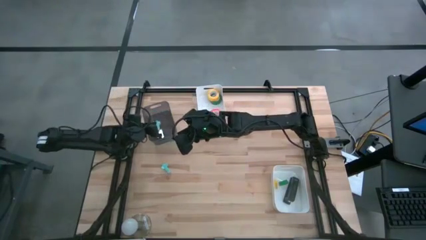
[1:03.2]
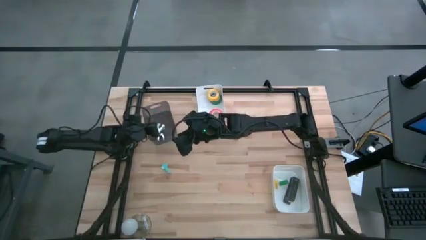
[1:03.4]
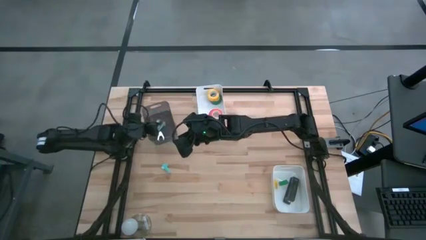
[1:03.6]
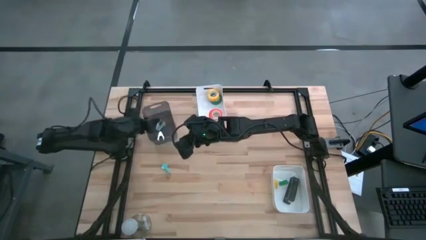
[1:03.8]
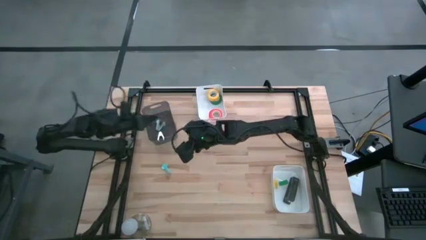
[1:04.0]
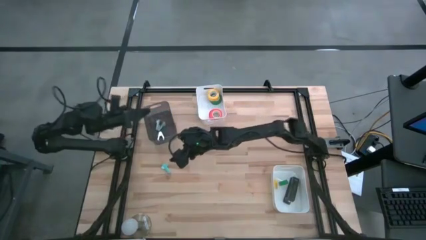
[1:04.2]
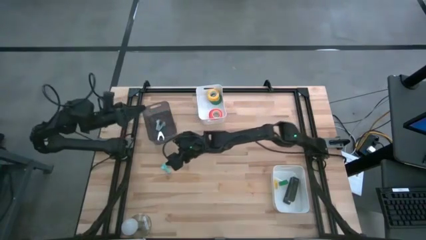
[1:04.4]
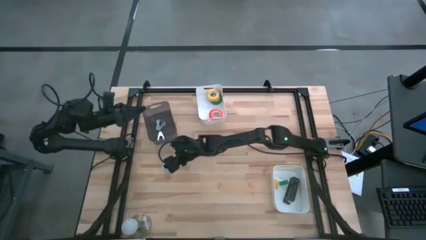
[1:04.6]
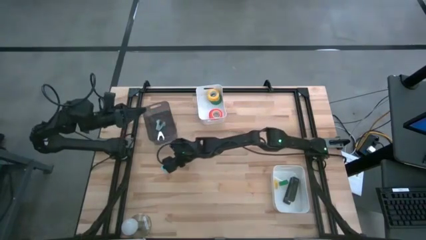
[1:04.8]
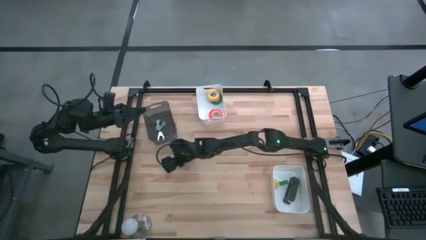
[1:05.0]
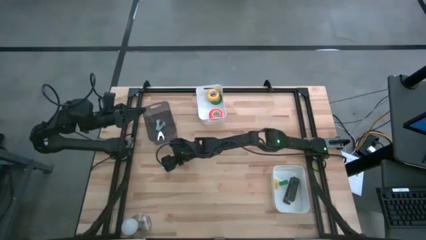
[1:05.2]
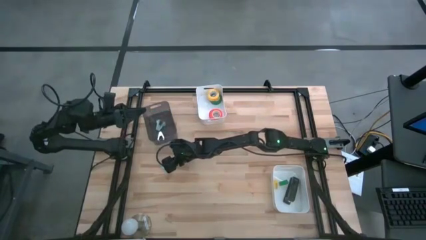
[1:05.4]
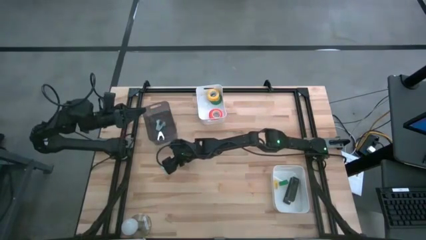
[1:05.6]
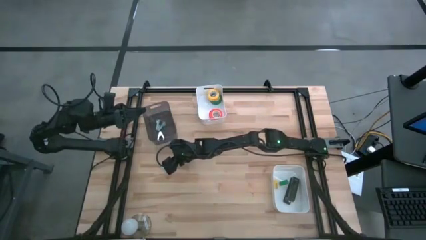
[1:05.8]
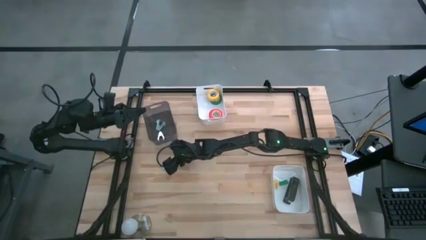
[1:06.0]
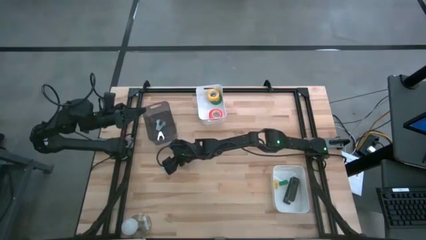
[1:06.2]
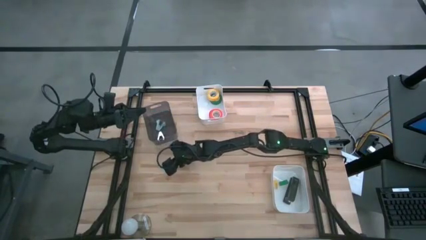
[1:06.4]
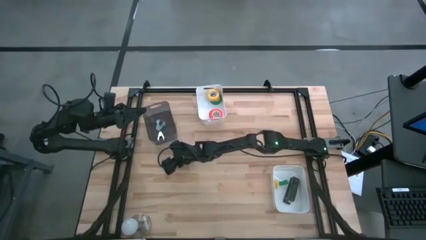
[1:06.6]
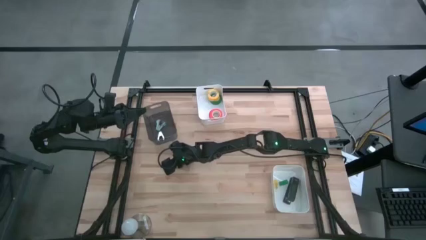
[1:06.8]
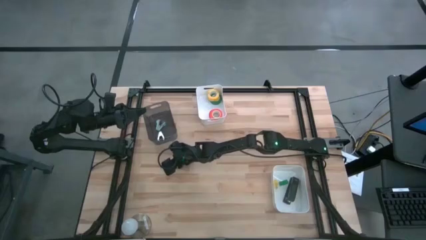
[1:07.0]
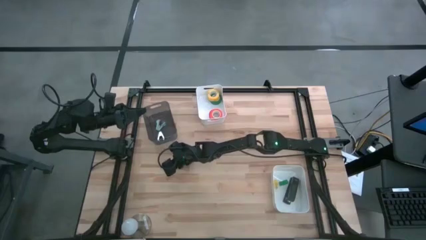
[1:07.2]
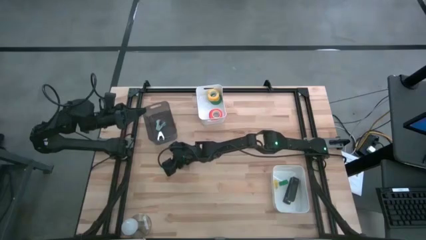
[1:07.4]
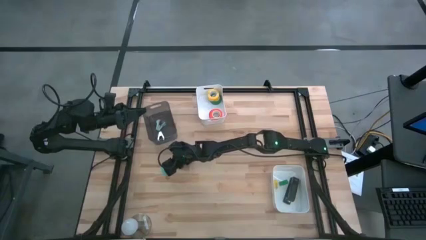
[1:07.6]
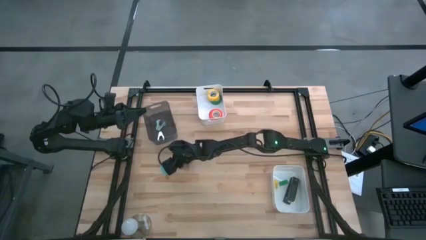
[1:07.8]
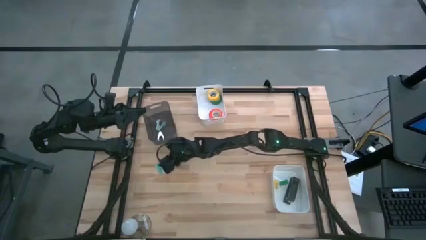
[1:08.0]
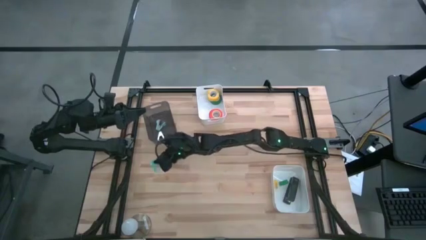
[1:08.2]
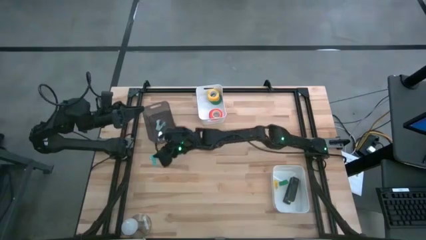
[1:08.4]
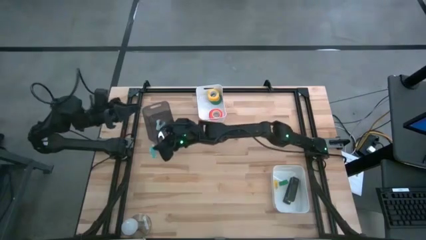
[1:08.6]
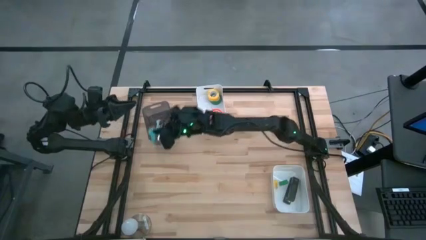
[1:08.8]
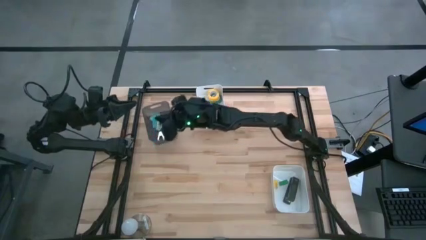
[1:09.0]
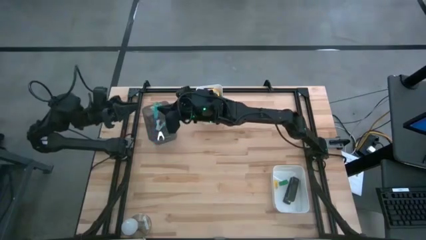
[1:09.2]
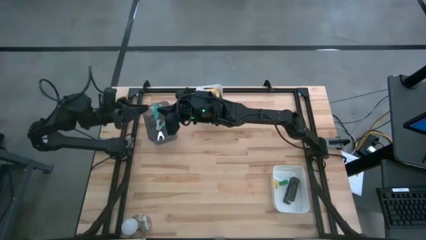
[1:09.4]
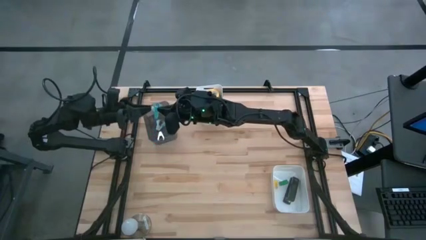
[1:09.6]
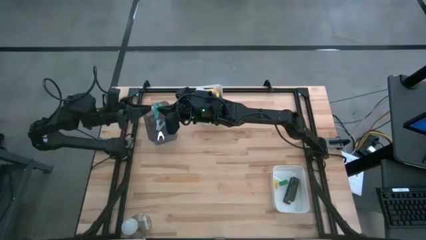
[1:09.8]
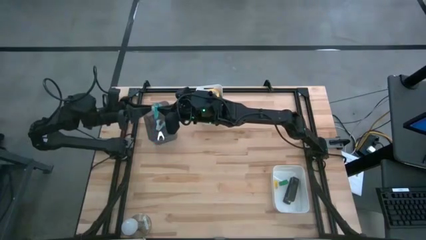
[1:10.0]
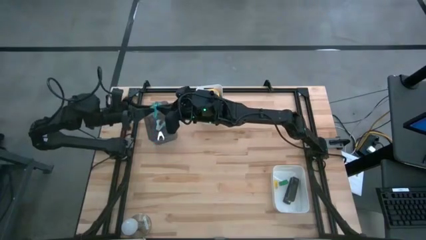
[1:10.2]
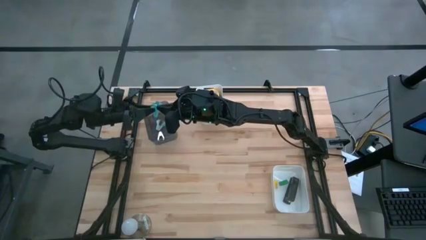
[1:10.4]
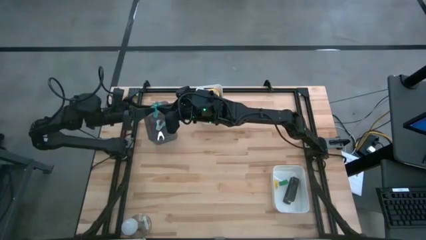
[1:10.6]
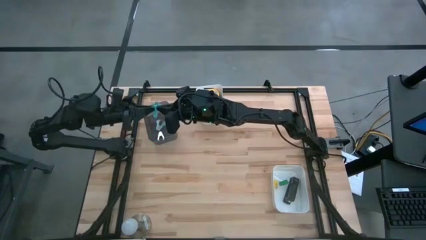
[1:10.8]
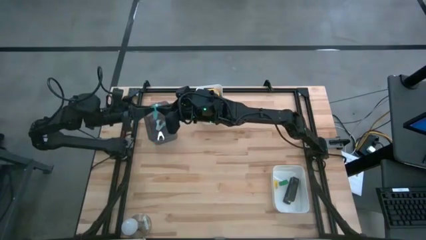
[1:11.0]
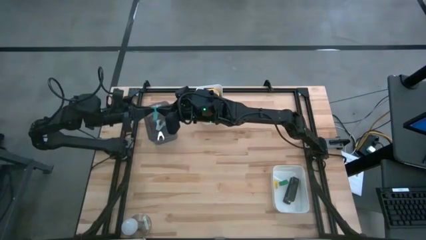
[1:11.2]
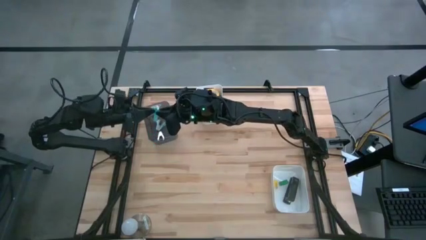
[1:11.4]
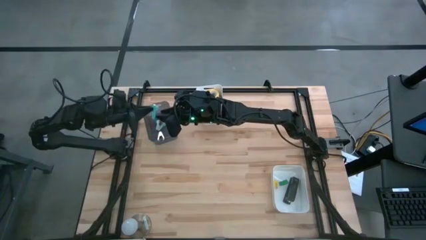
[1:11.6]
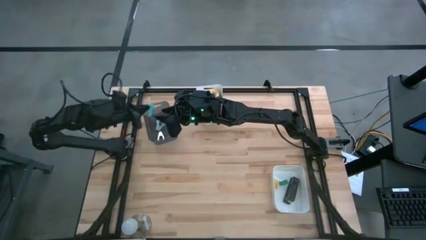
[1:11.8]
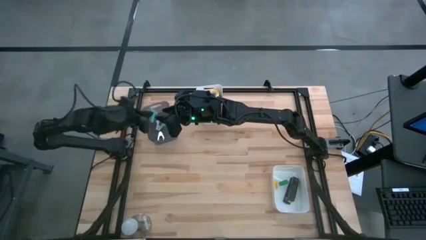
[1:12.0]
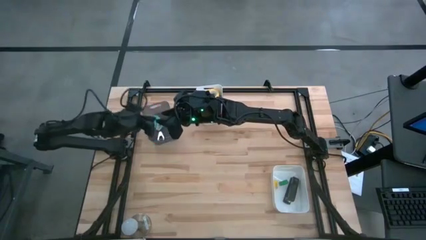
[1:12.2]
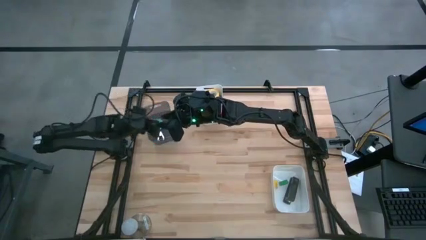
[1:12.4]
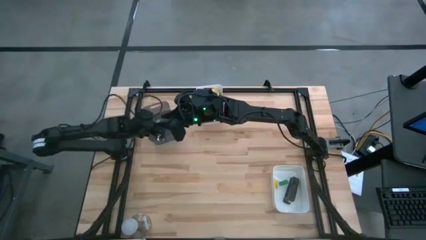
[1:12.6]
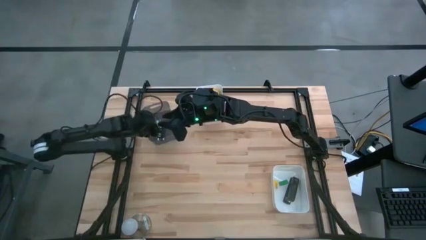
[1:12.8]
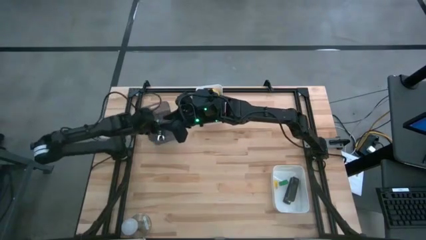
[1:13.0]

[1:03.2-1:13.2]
Task: Pick and place Stapler, Stapler remover, tape
Put the light blue staple remover into the black bin

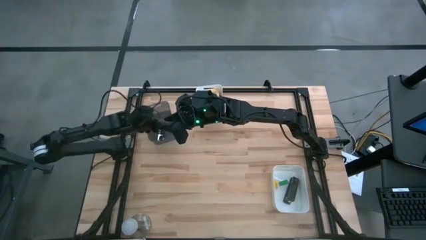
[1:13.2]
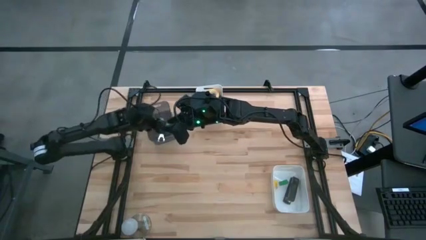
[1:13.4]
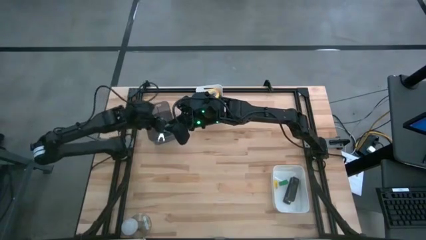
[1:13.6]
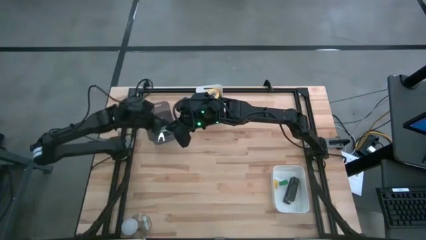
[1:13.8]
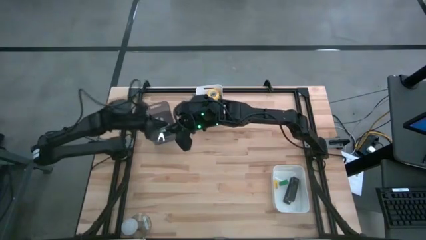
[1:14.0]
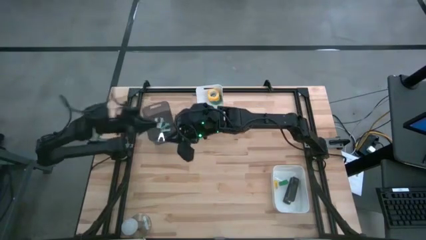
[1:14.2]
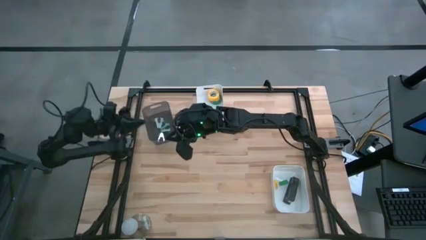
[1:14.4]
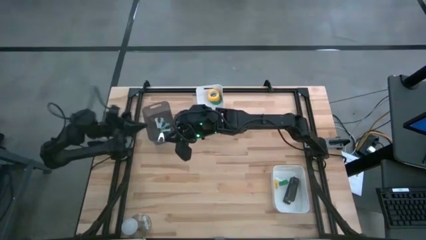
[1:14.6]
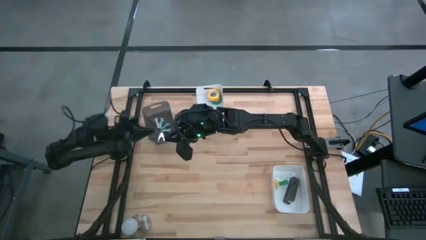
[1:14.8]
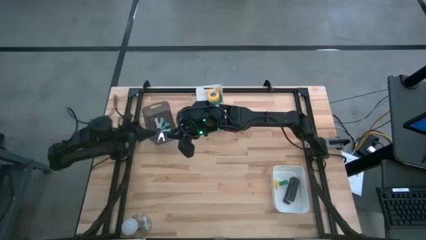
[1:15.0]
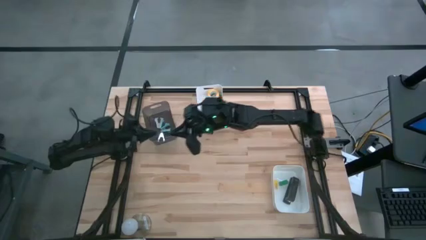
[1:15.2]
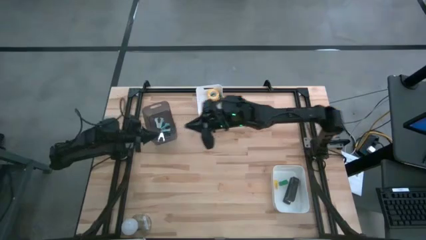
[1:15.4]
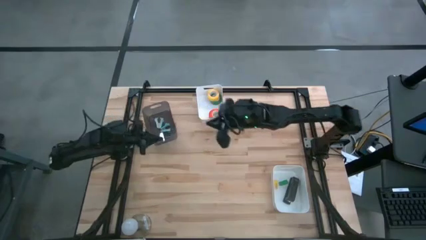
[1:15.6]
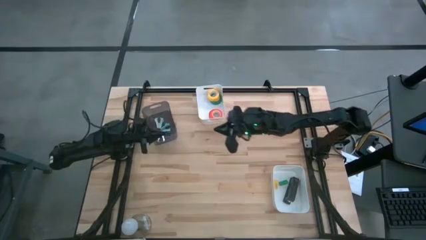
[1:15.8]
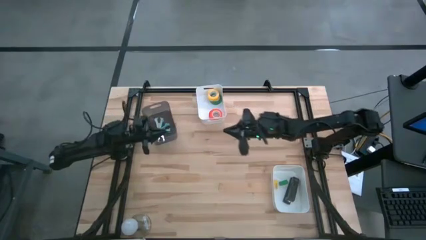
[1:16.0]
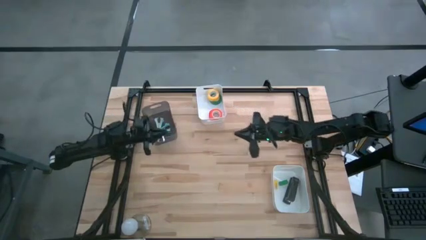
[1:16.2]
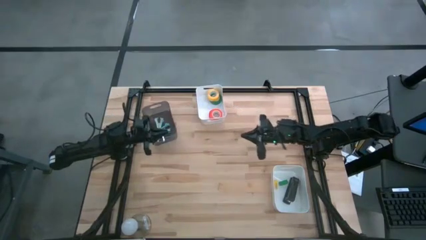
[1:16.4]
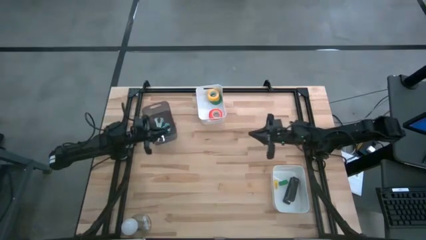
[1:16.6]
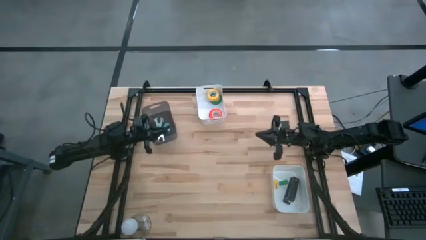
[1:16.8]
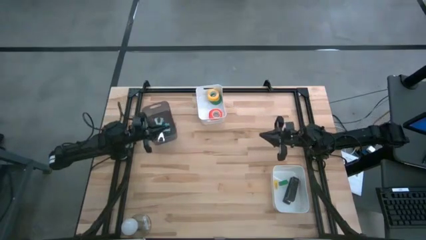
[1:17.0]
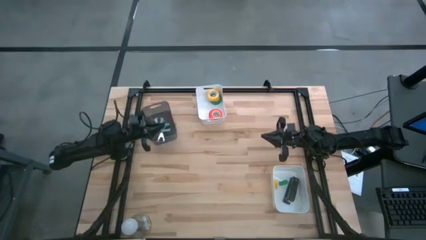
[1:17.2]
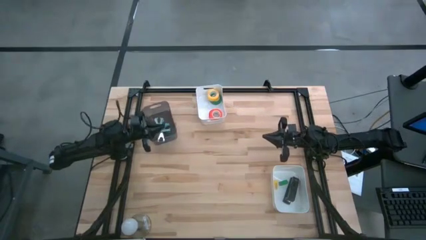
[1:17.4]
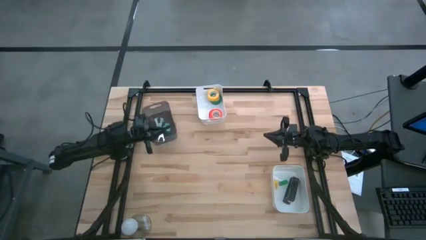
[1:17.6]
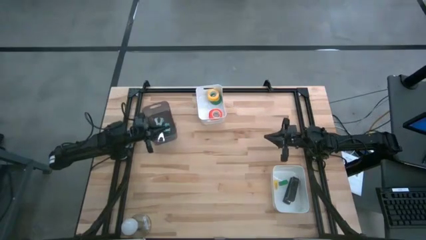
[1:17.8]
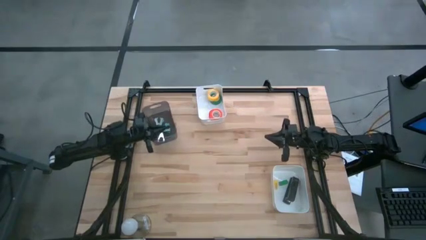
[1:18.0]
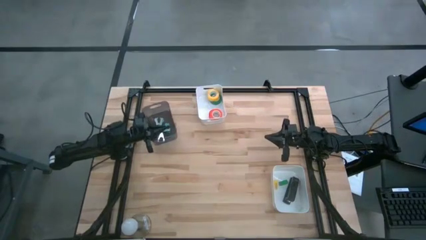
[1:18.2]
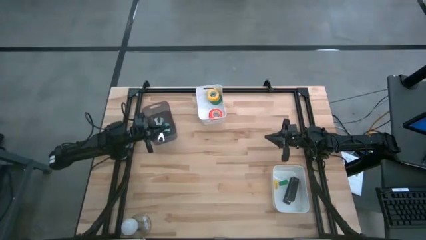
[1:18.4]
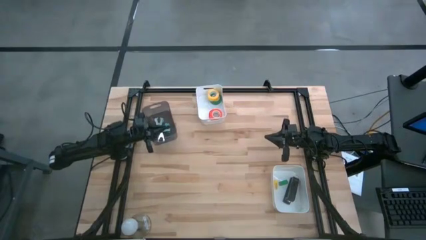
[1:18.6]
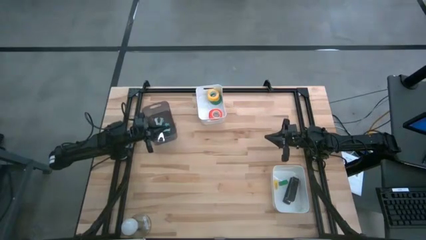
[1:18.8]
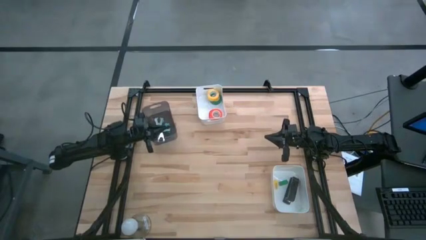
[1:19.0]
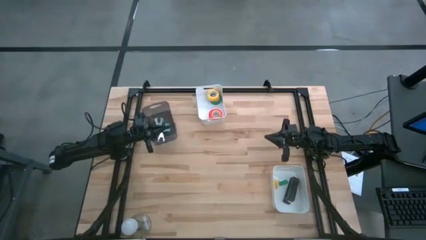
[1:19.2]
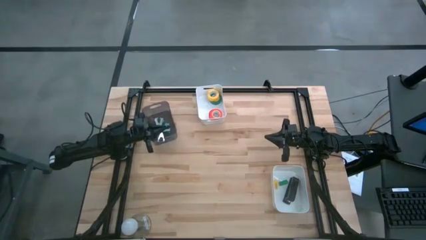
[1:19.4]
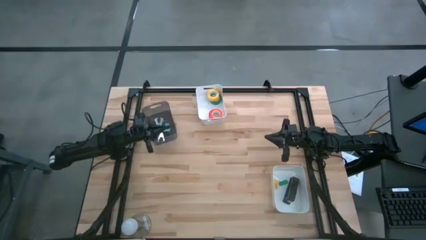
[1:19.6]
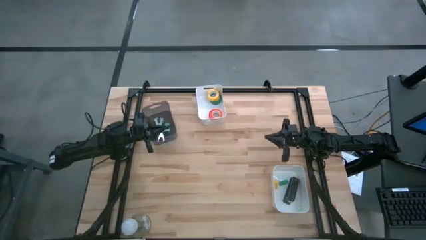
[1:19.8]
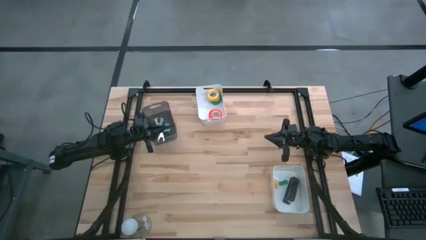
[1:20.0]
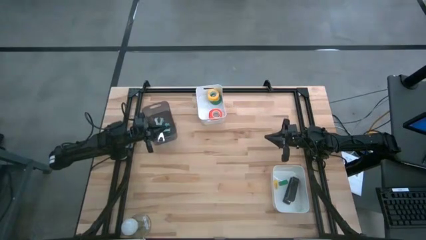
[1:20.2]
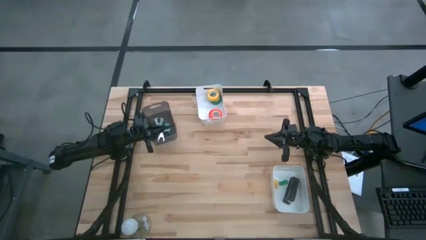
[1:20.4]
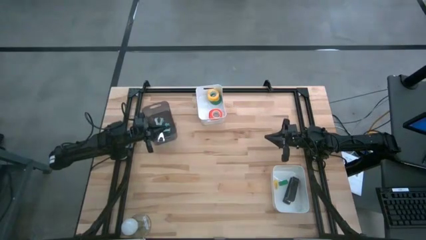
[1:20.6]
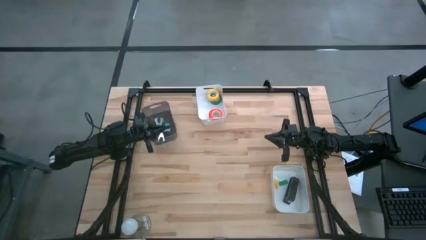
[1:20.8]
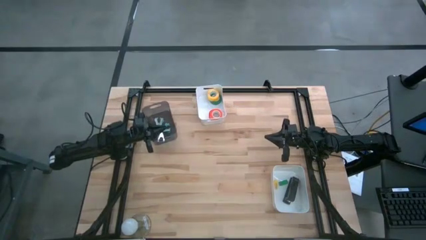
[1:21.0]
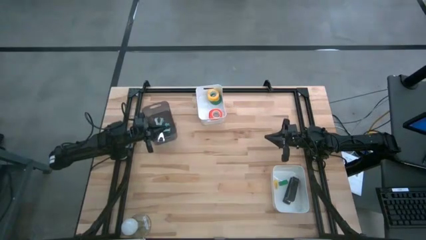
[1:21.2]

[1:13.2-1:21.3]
Return to Home Position
